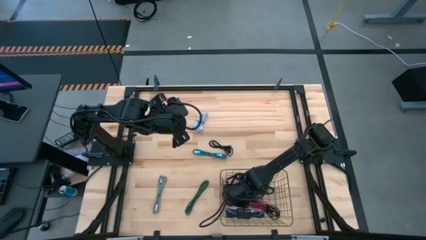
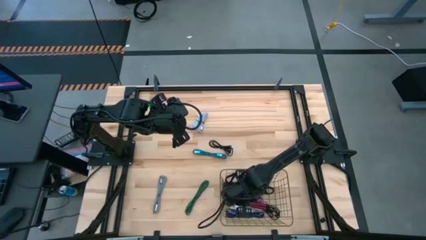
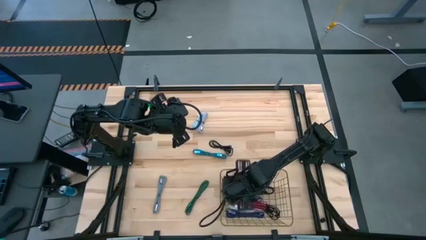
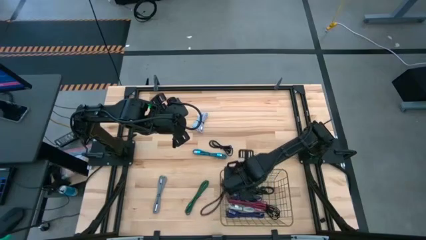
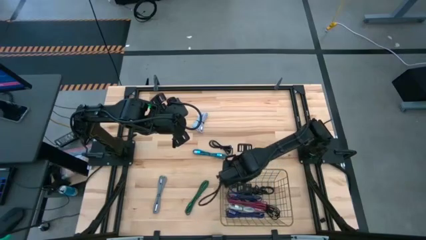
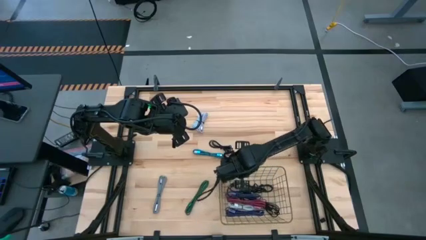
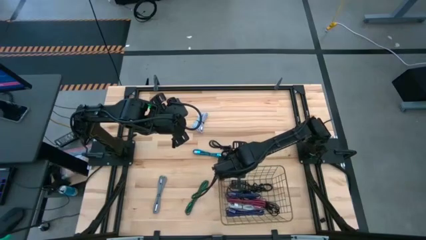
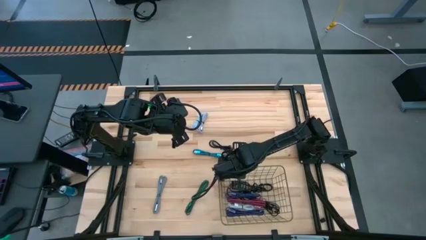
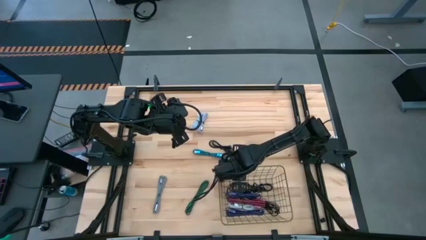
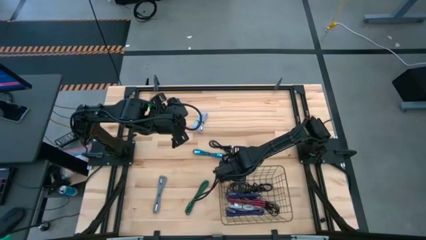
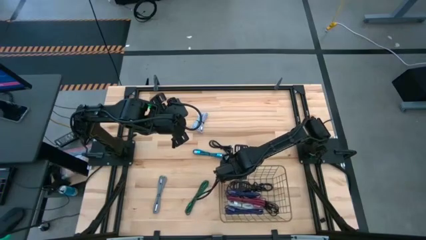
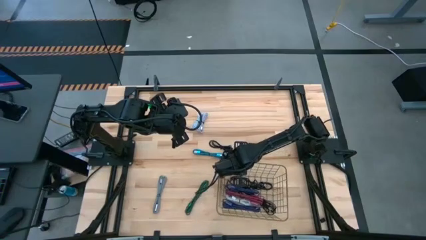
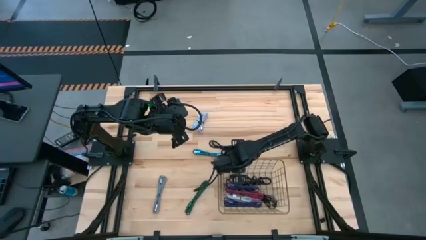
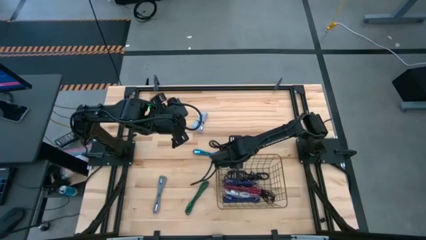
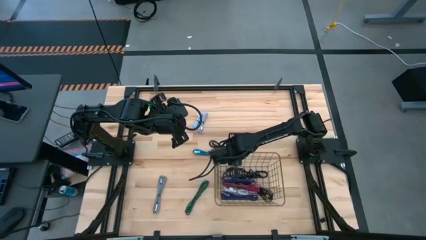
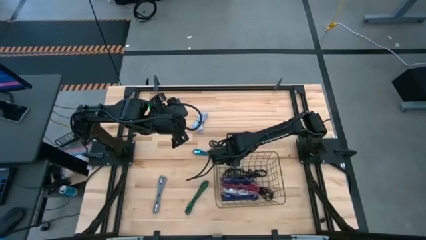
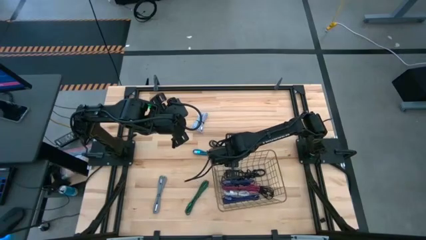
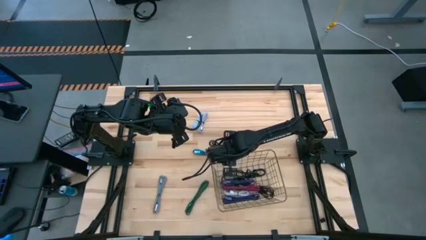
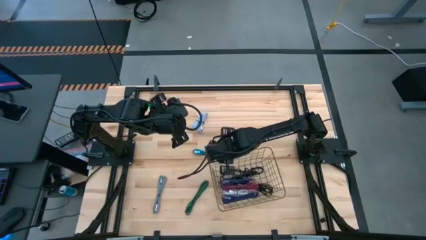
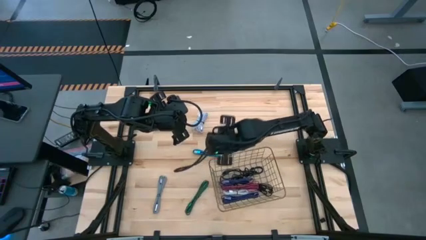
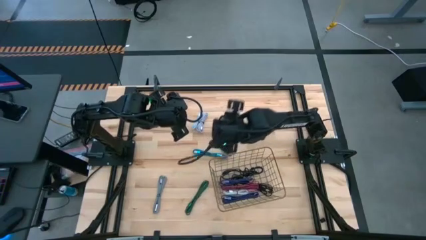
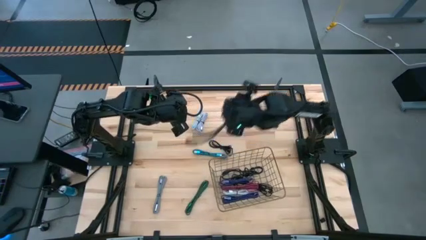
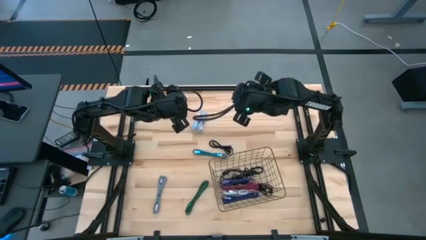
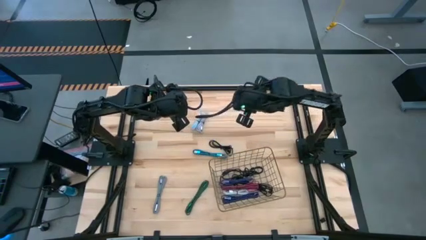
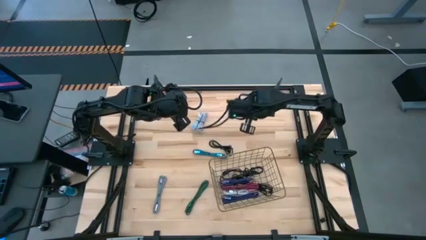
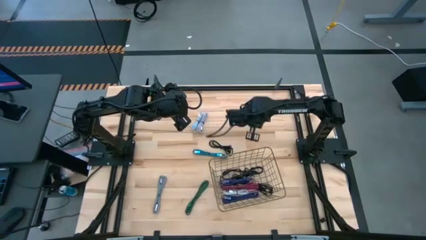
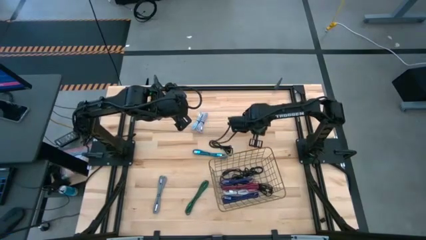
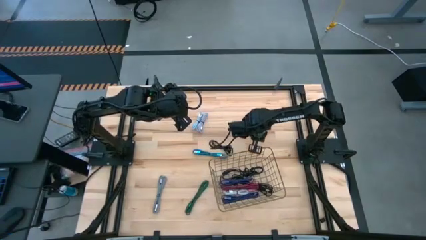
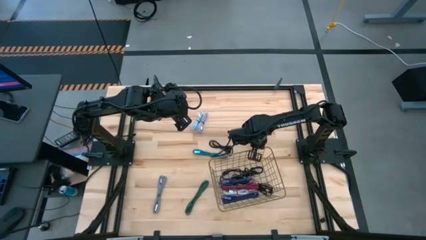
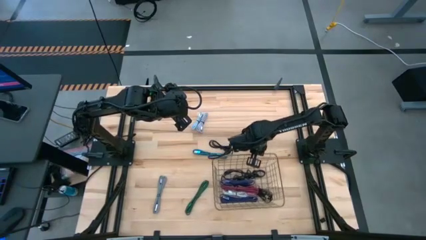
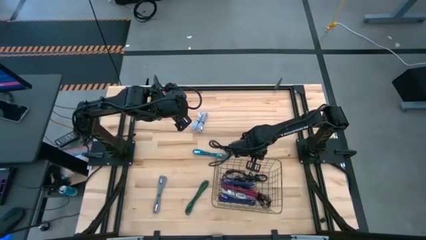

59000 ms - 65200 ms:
Task: Pick and place USB-C Cables
Adjust the wire basket

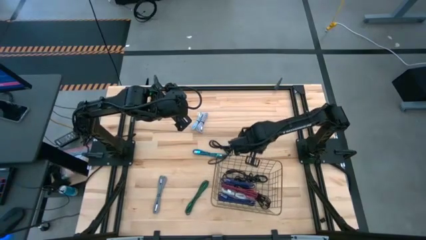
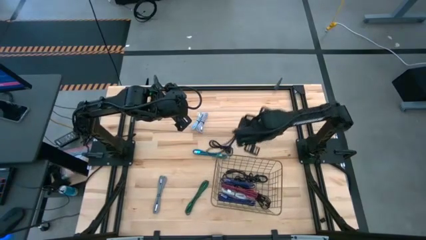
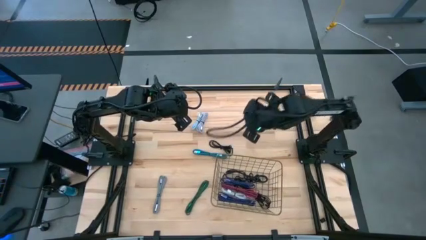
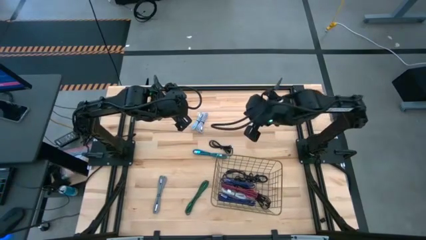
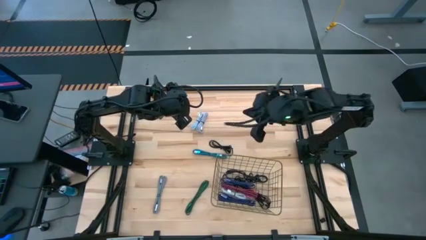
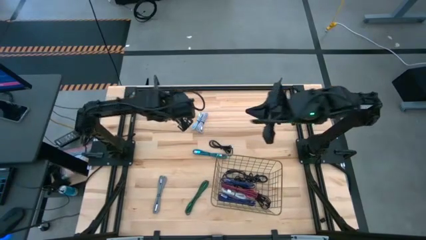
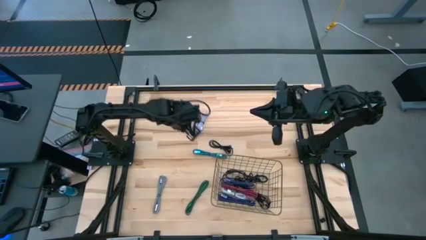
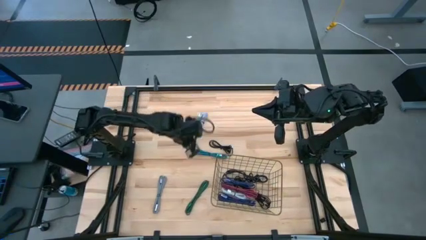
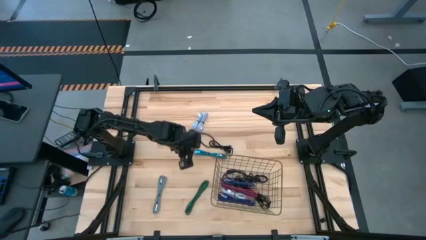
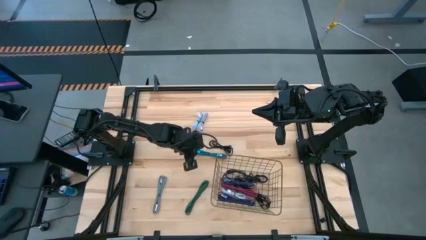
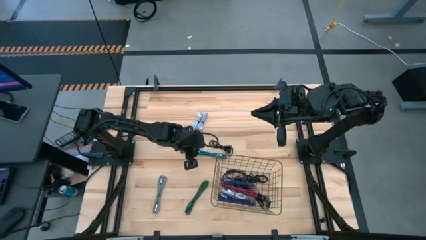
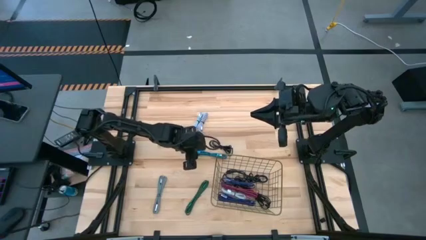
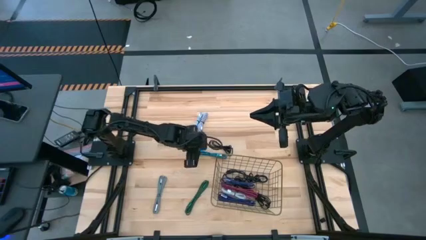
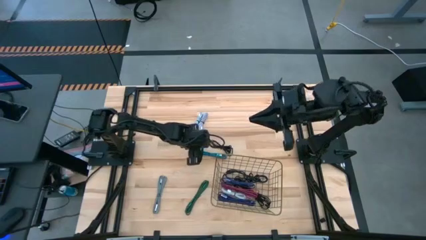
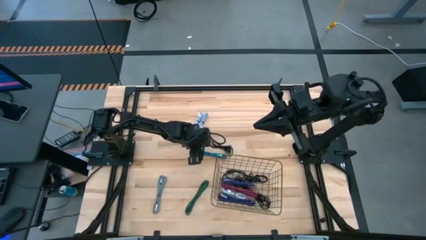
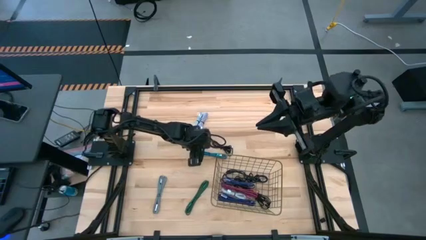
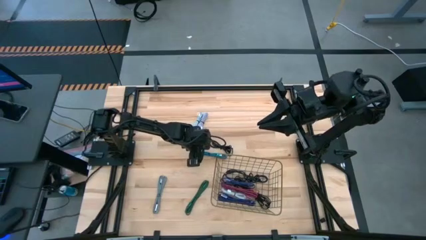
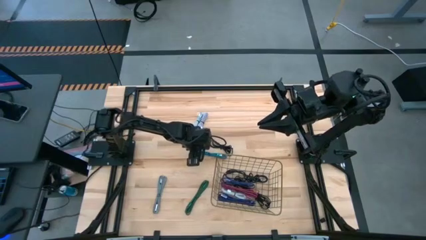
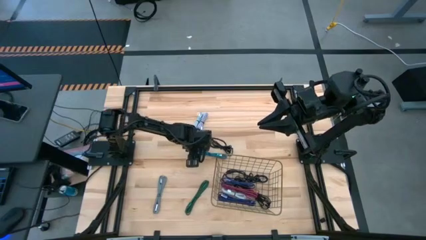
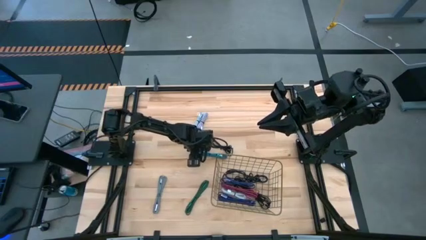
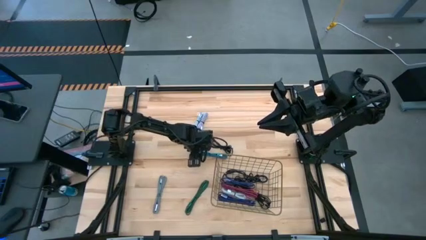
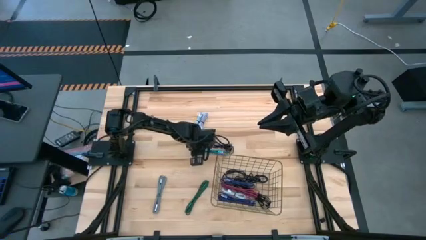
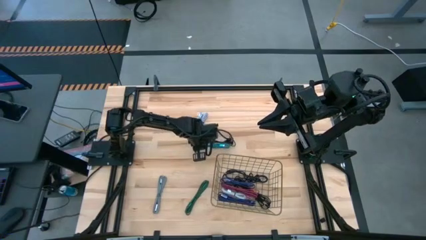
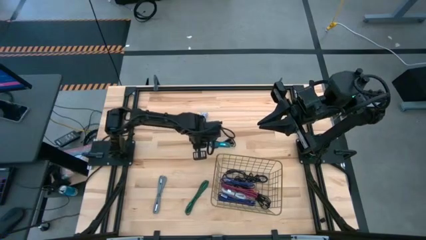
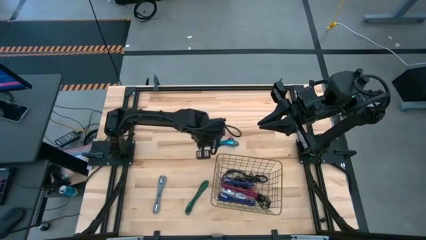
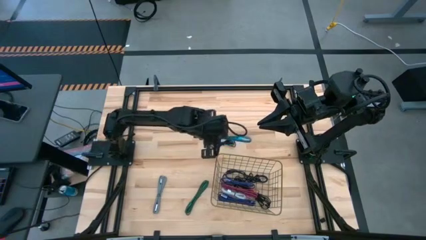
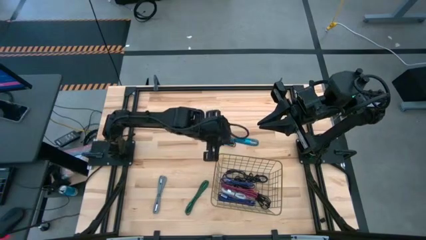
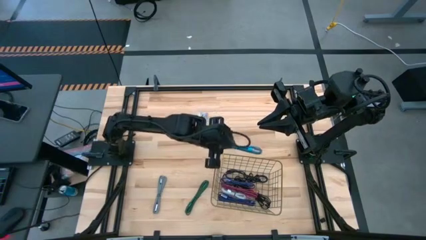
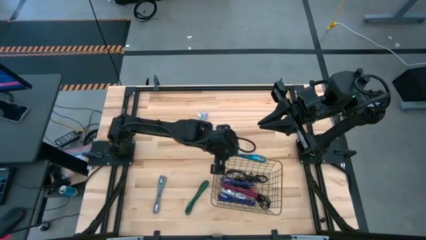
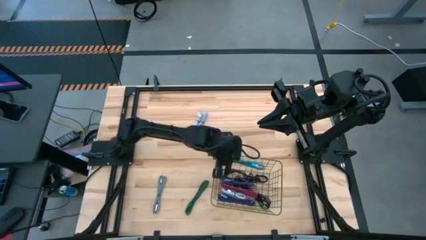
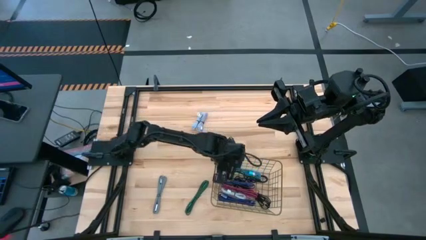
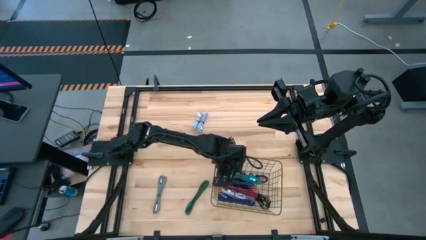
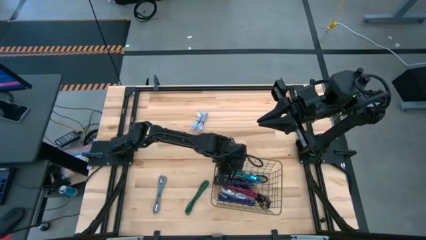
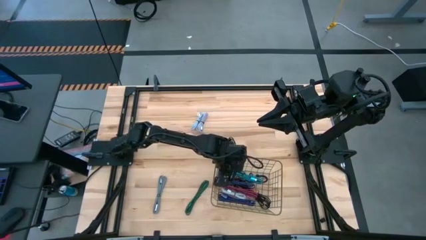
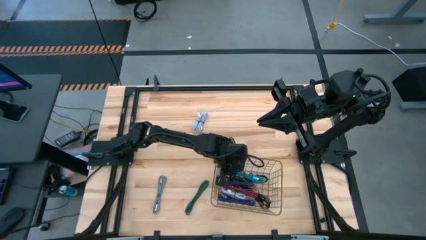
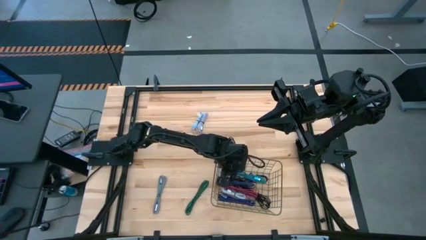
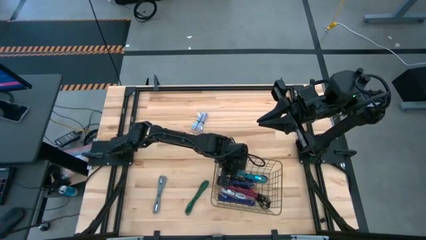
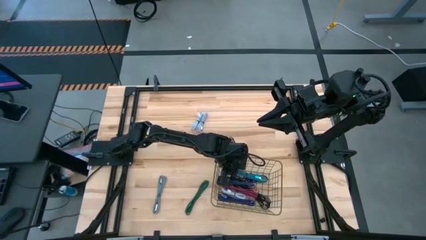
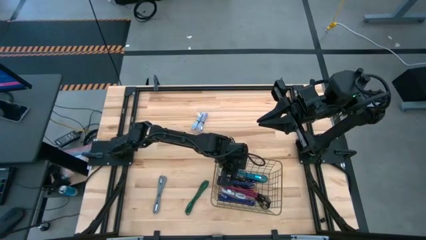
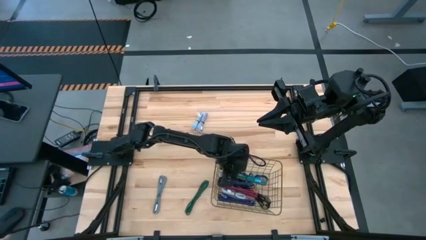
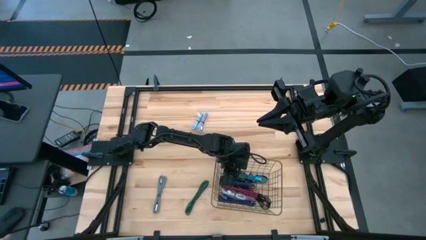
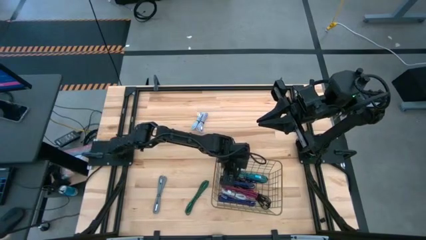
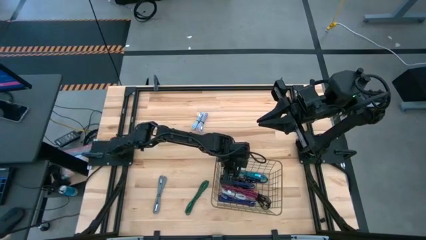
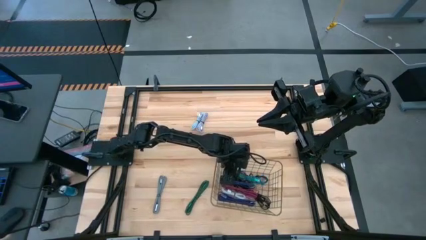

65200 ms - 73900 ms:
Put the black blue charger cable into the wire basket
